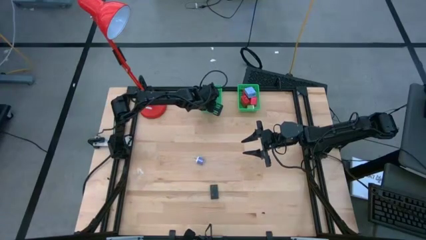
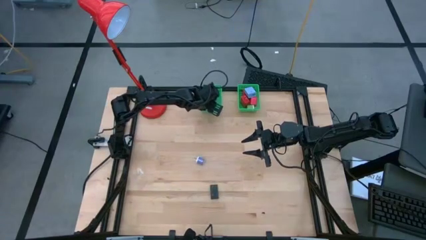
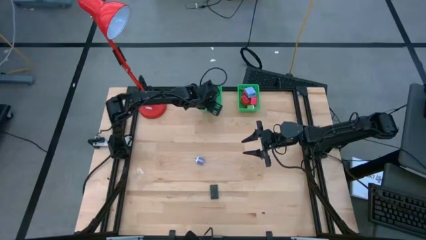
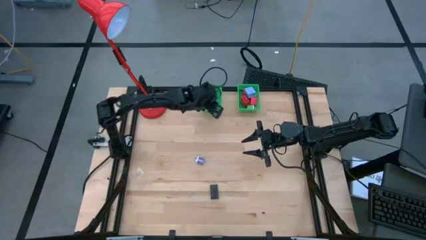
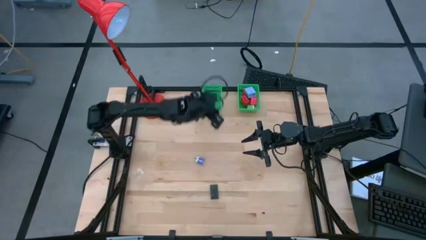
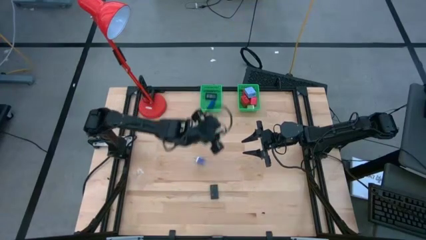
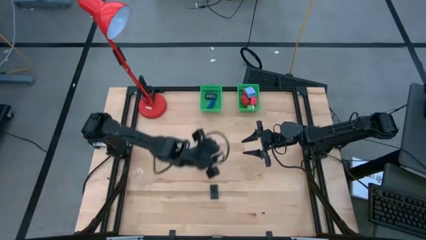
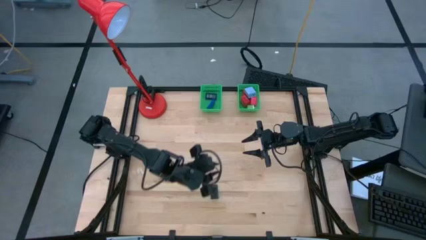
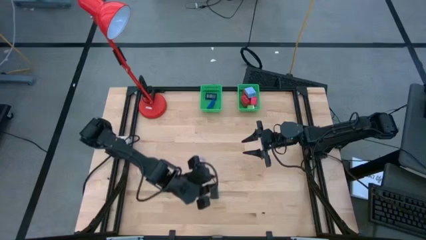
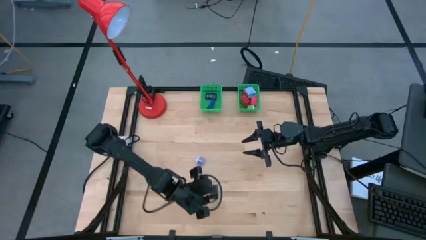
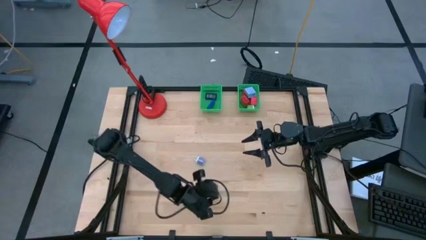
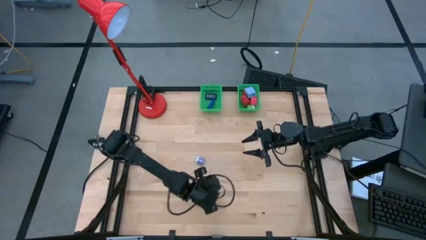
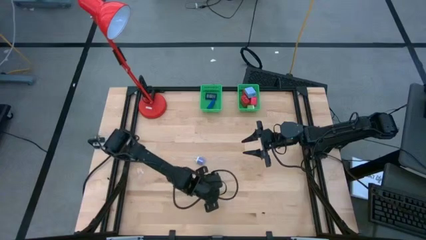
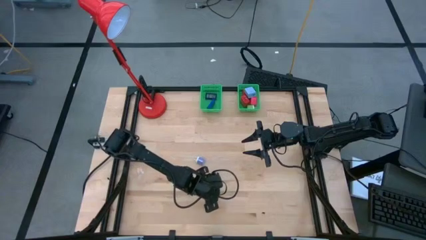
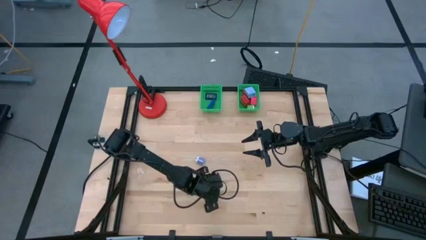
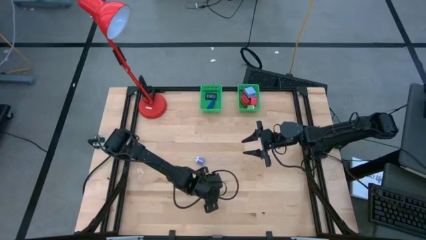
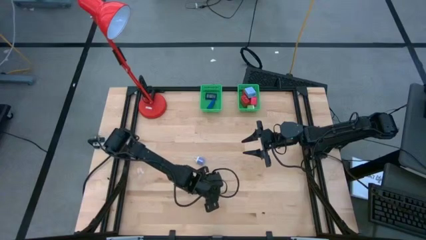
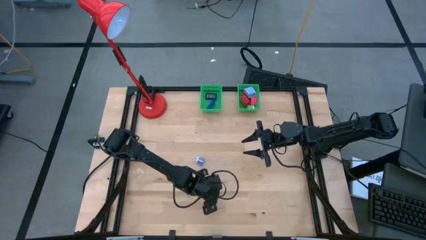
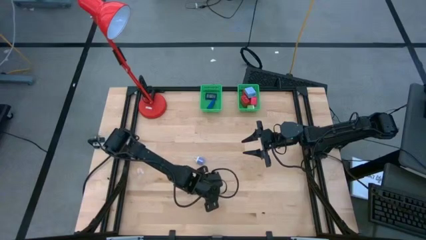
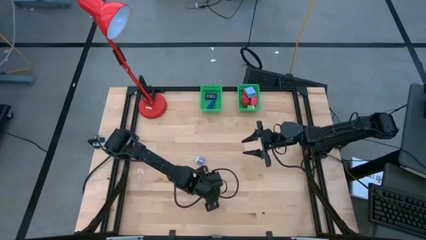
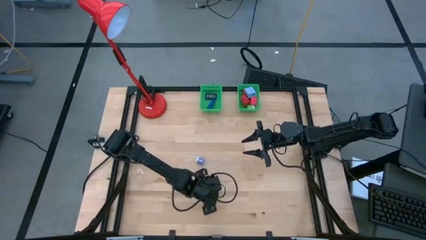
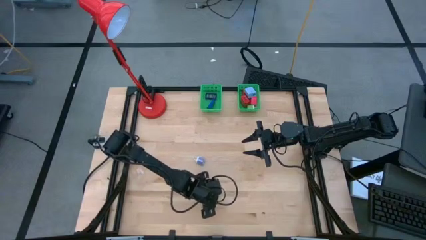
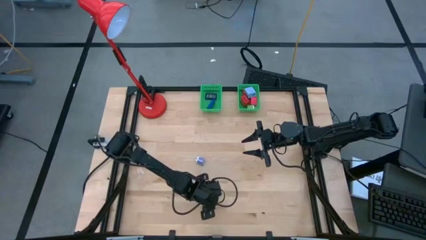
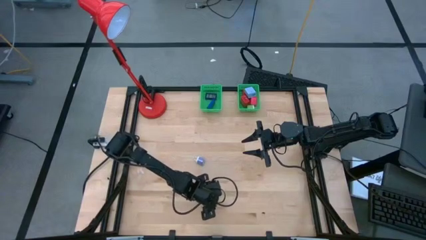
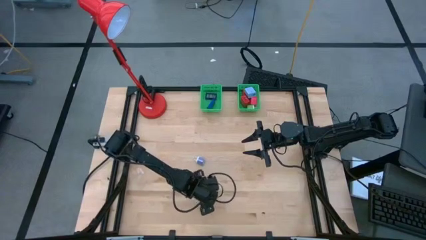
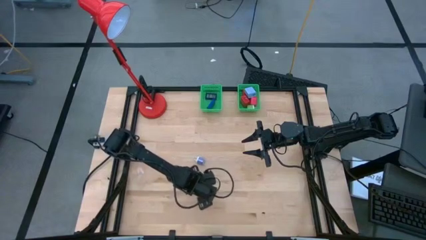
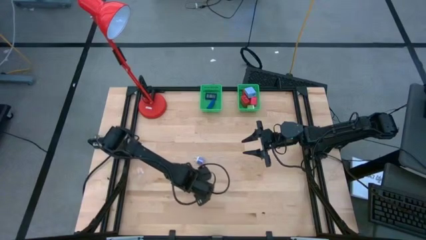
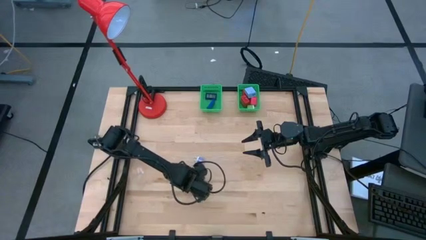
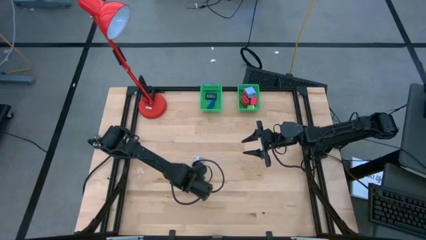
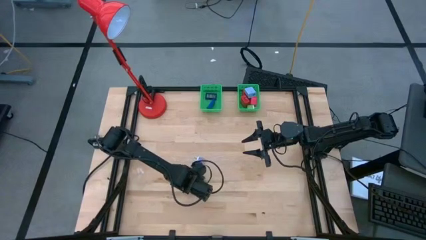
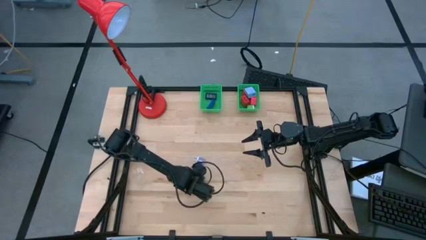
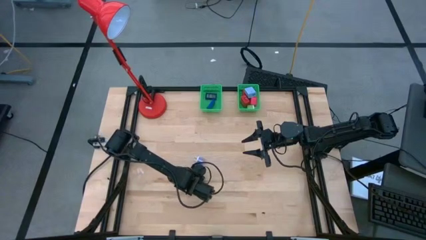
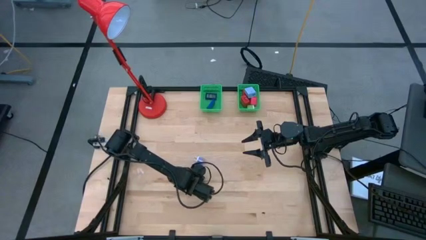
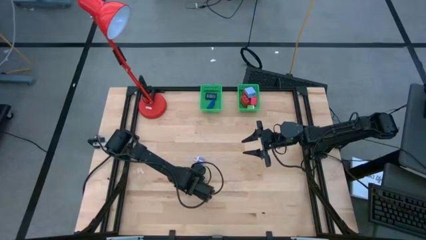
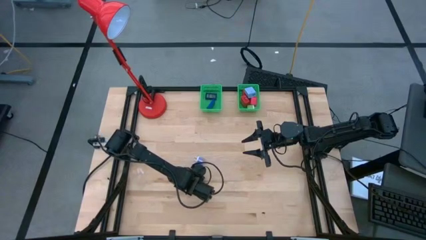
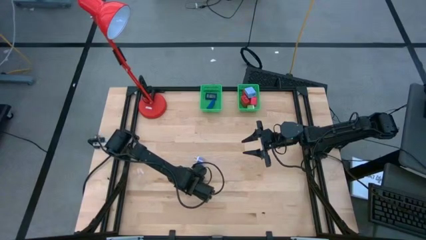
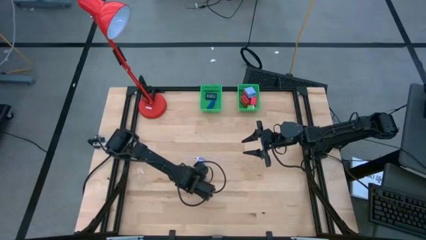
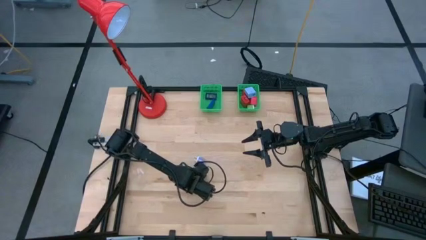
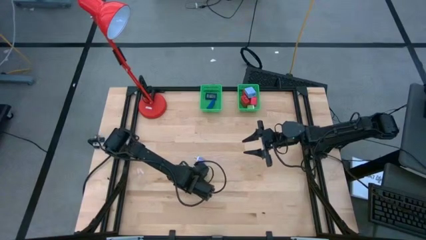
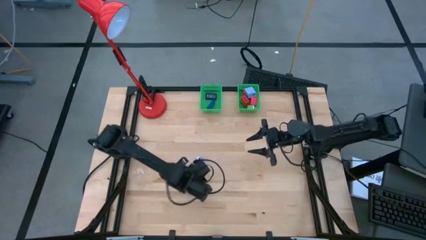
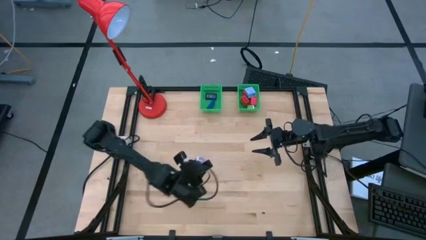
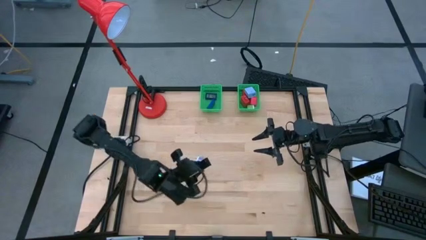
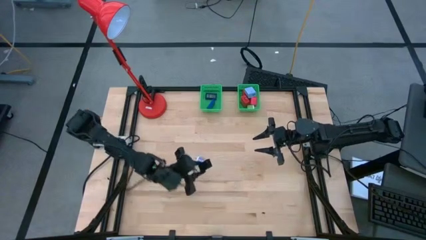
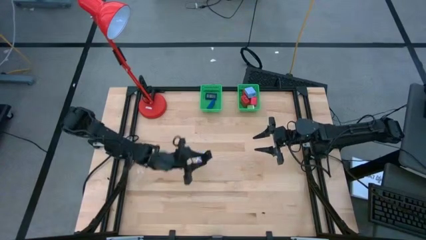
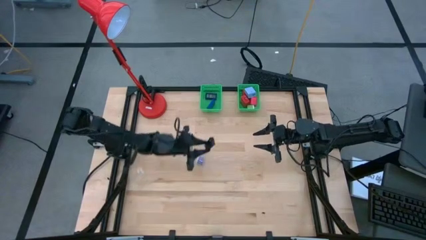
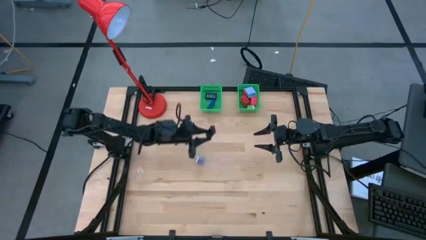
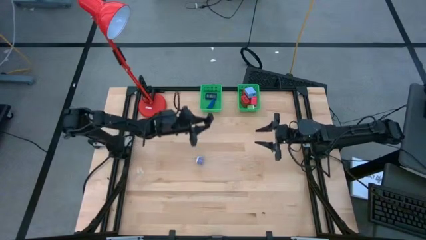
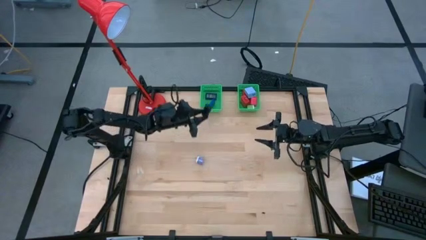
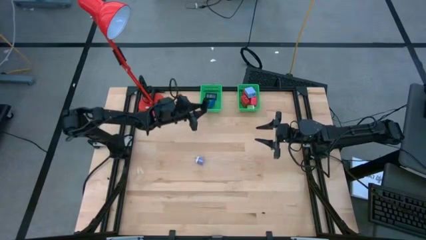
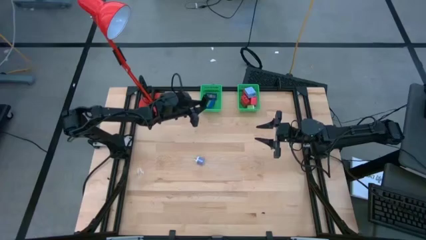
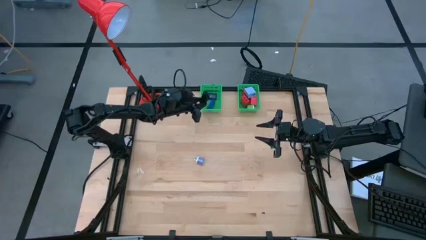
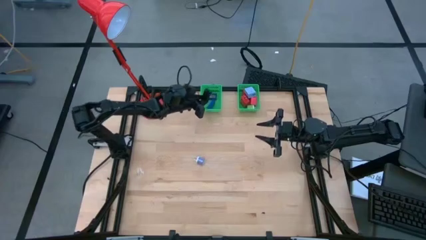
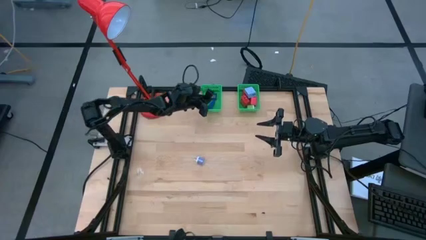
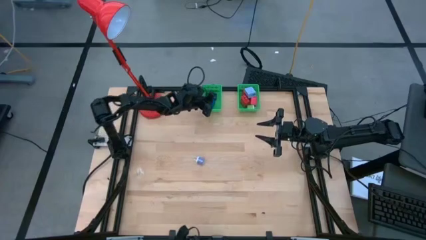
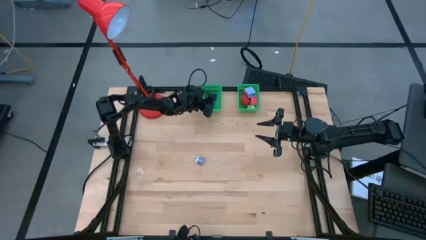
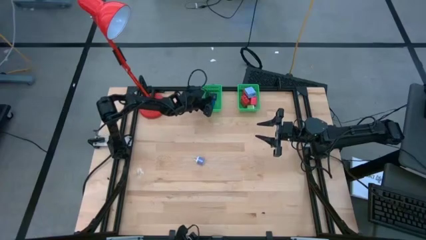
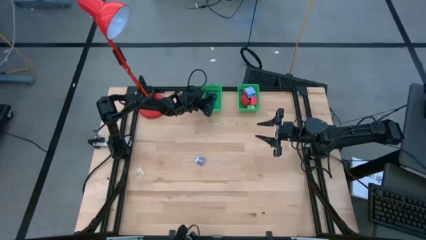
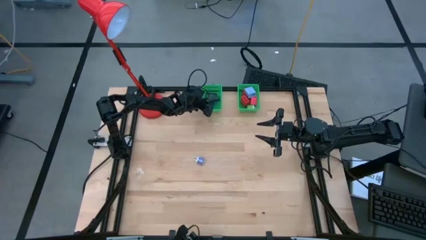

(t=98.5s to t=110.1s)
Task: Pick & Place Office items
Put the black digital timer into the left green basket

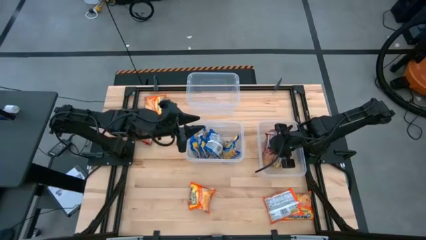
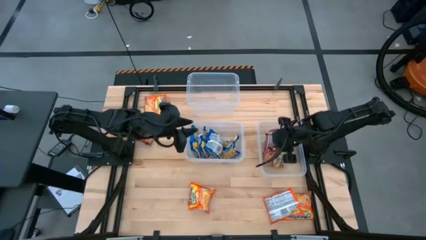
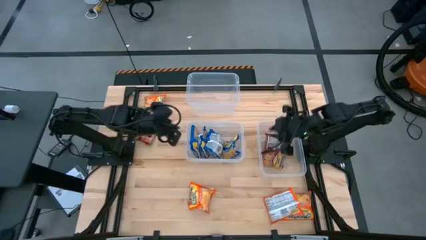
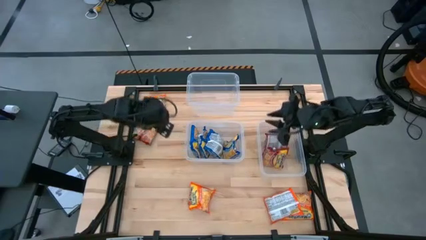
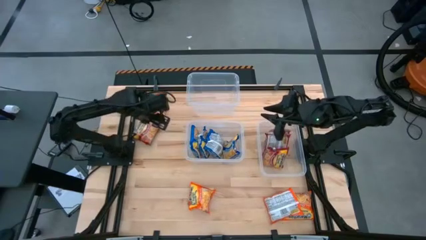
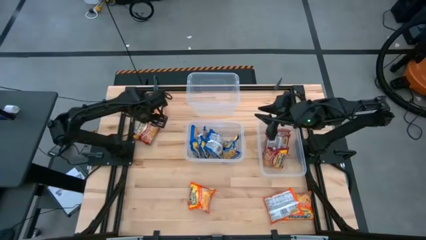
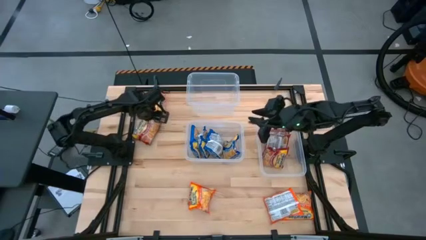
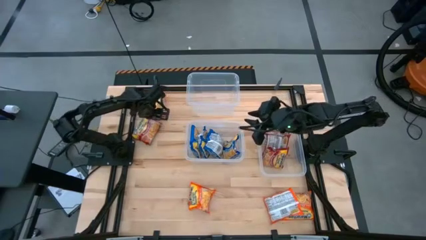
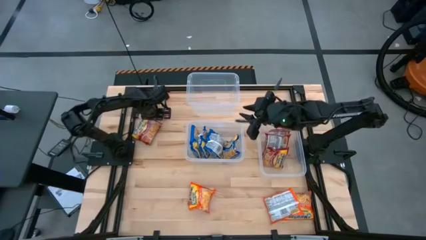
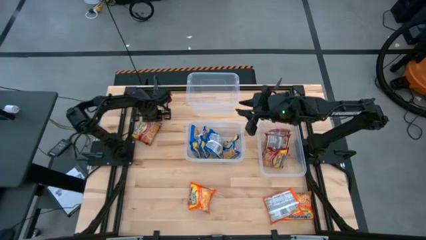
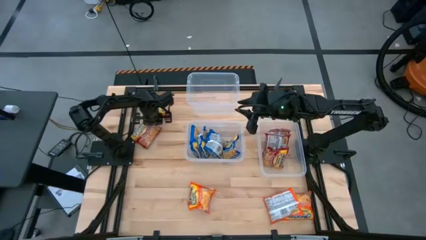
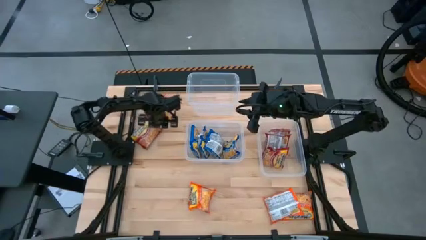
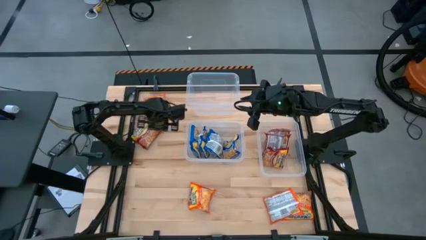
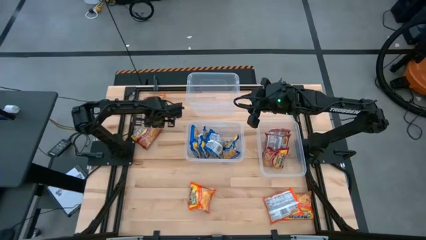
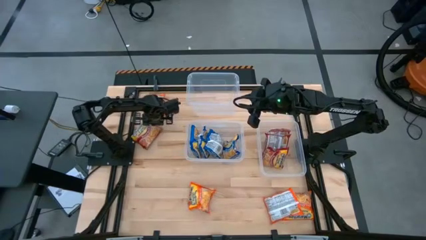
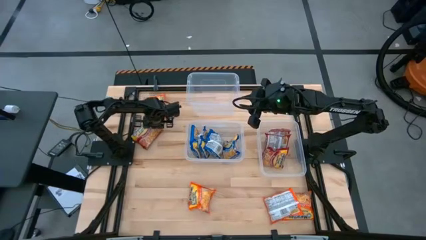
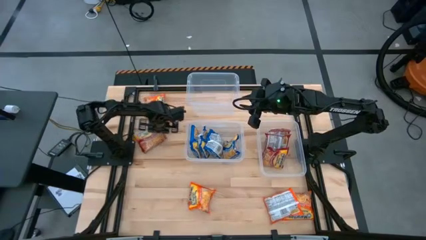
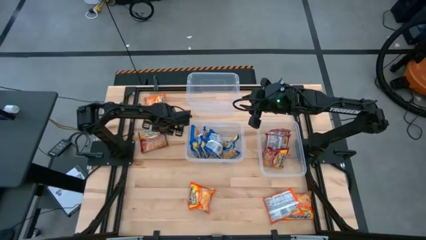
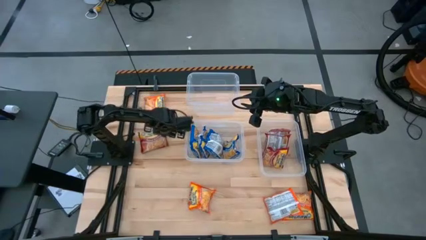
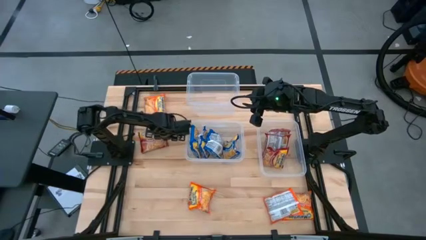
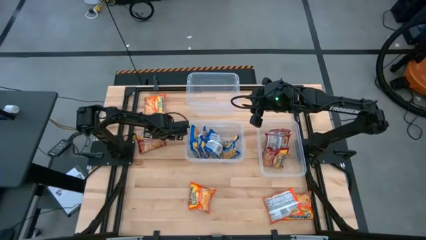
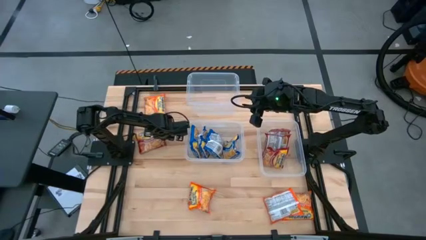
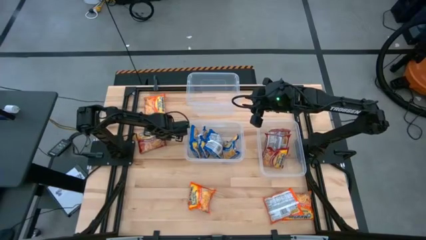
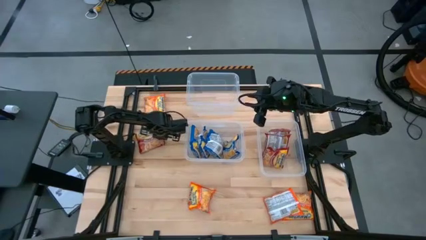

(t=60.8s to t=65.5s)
Task: Sort Maruchan noodles
Put the red noodle pack into the bottom right transparent bin
